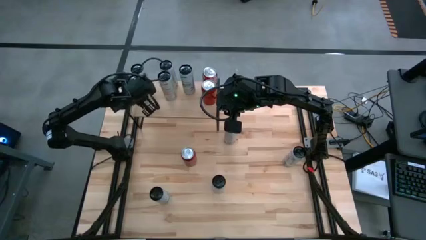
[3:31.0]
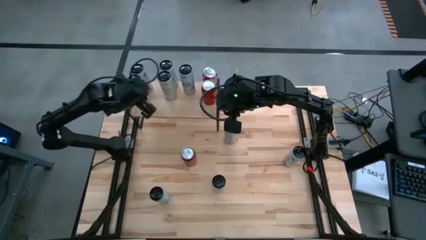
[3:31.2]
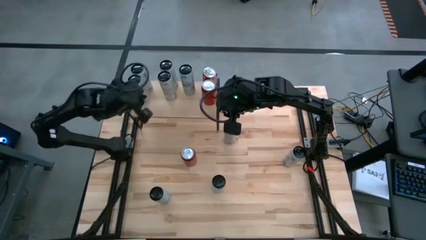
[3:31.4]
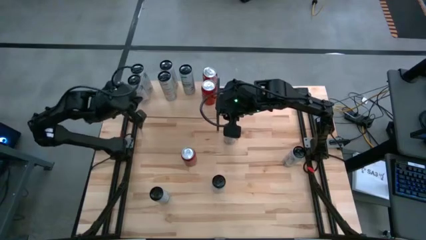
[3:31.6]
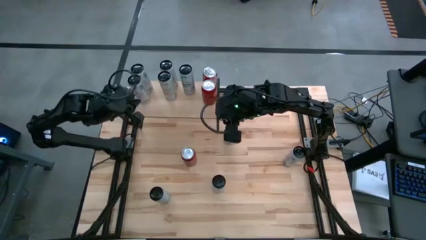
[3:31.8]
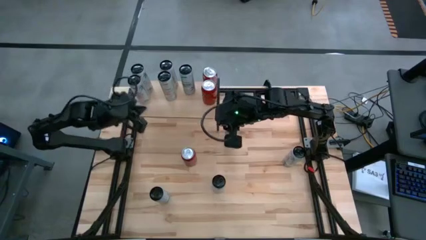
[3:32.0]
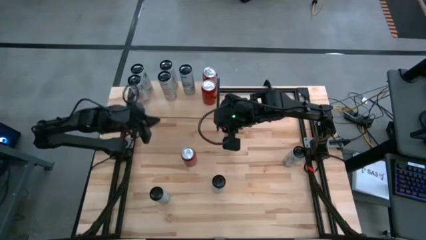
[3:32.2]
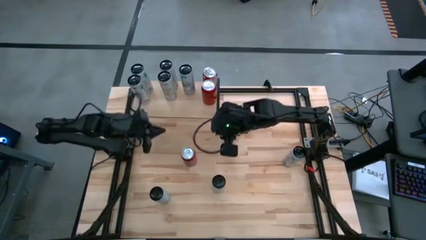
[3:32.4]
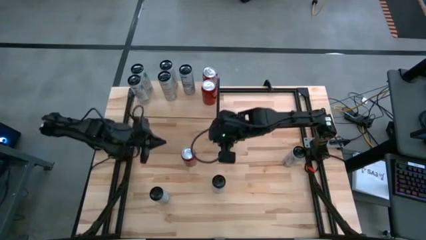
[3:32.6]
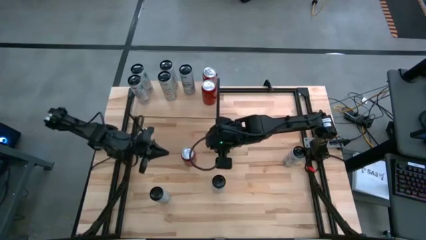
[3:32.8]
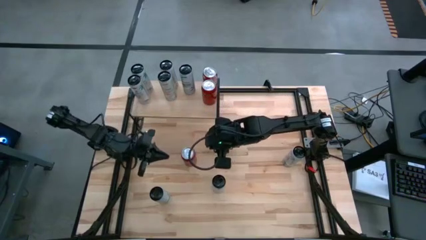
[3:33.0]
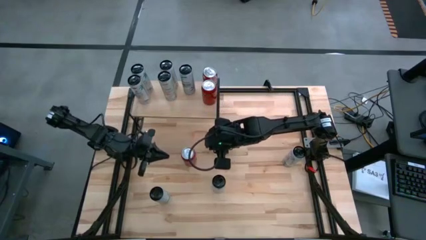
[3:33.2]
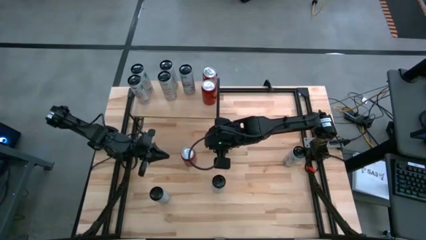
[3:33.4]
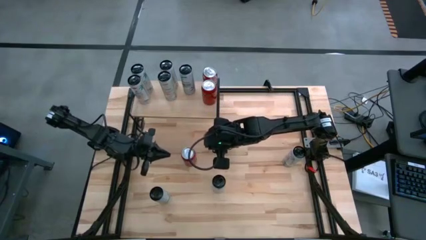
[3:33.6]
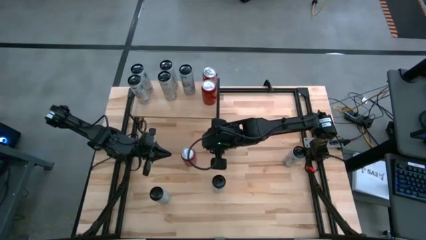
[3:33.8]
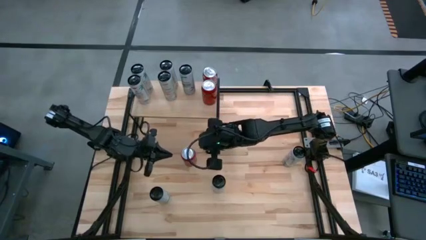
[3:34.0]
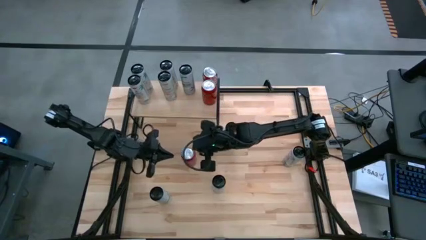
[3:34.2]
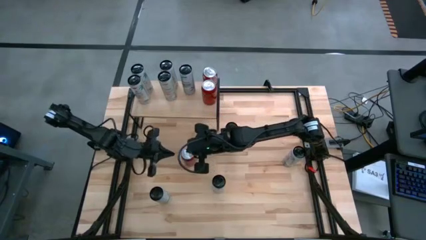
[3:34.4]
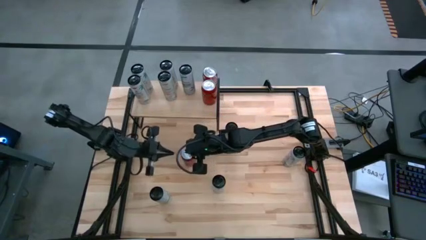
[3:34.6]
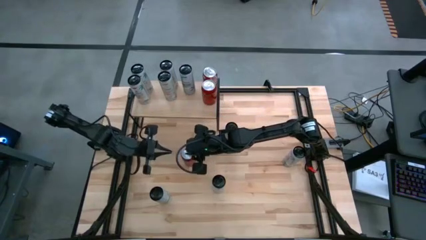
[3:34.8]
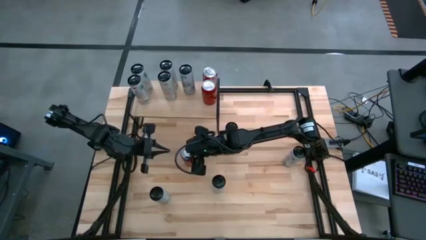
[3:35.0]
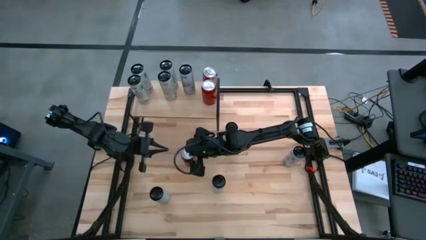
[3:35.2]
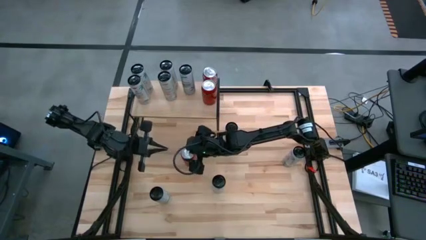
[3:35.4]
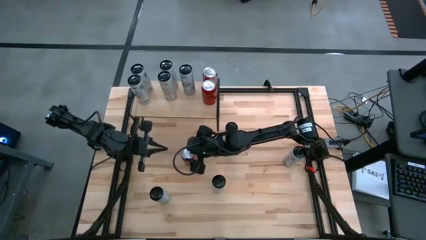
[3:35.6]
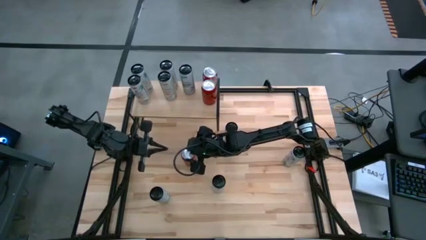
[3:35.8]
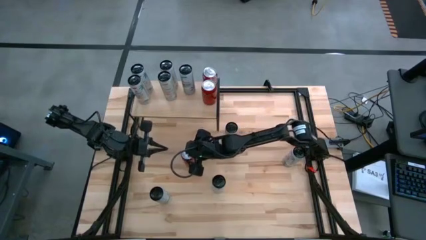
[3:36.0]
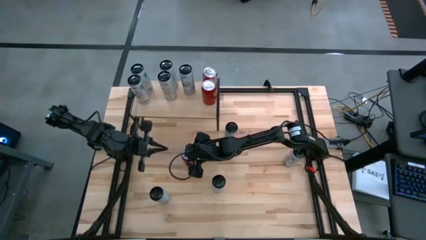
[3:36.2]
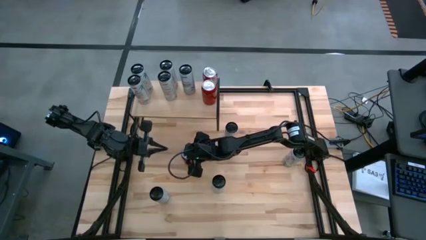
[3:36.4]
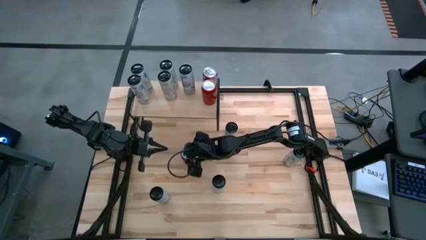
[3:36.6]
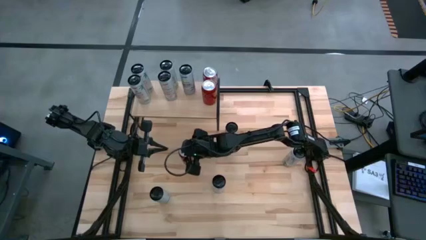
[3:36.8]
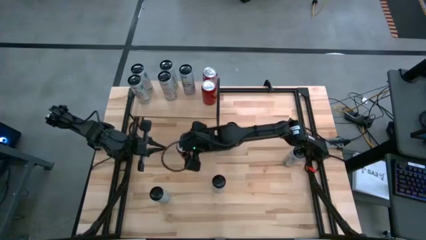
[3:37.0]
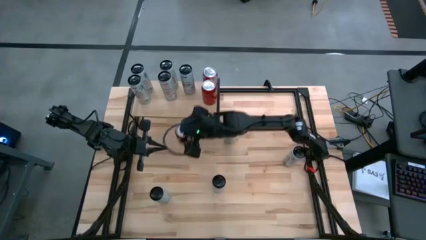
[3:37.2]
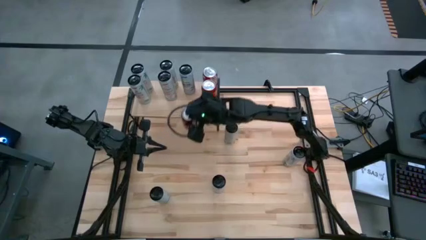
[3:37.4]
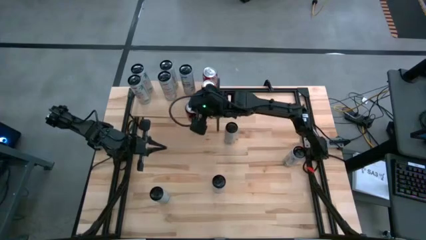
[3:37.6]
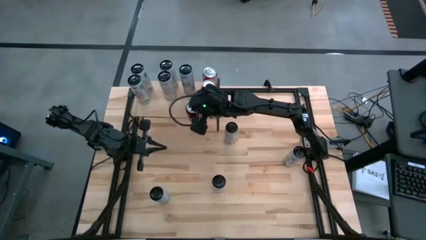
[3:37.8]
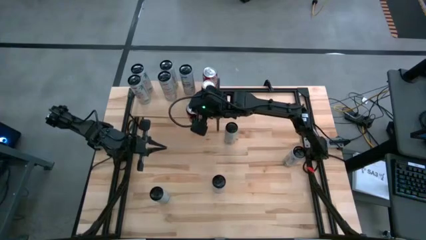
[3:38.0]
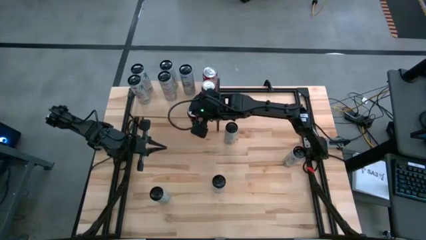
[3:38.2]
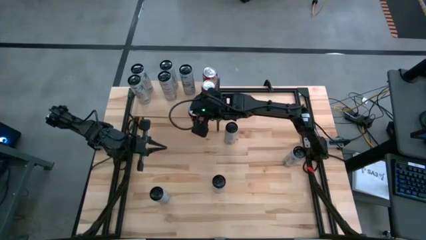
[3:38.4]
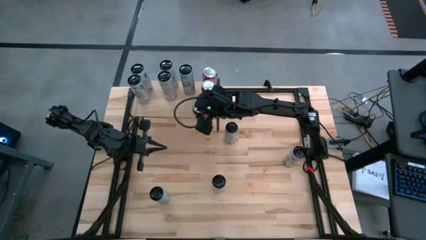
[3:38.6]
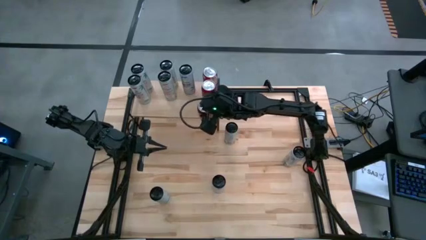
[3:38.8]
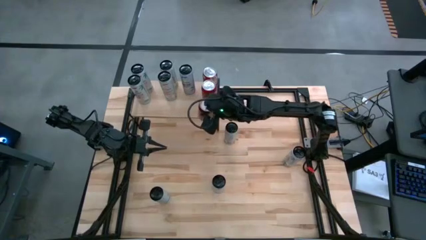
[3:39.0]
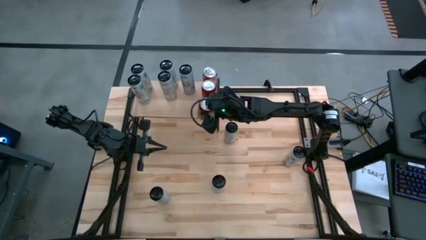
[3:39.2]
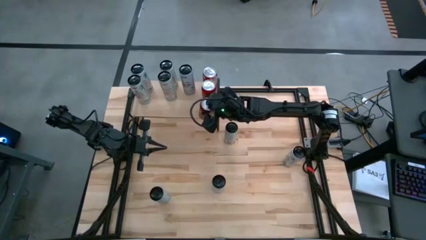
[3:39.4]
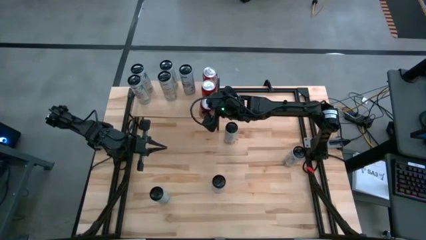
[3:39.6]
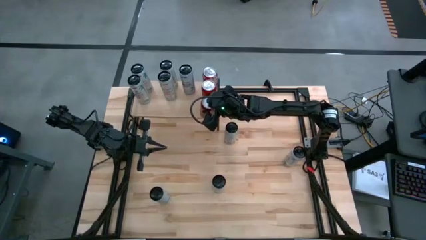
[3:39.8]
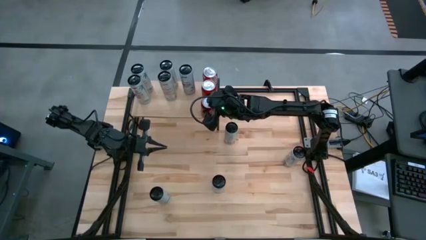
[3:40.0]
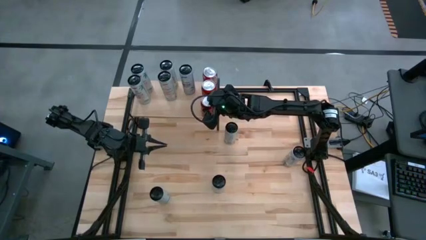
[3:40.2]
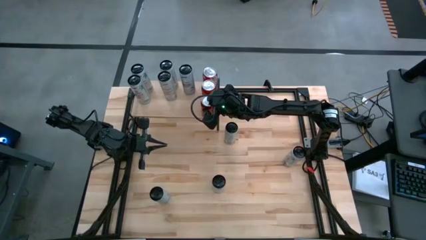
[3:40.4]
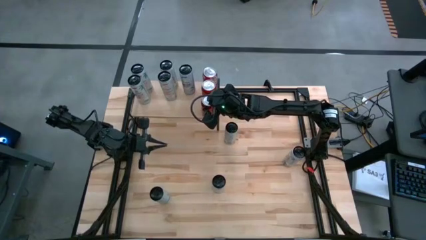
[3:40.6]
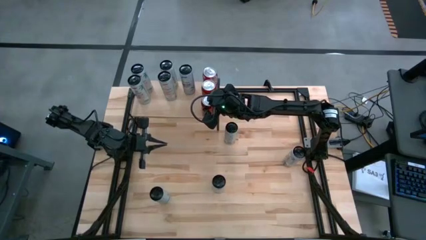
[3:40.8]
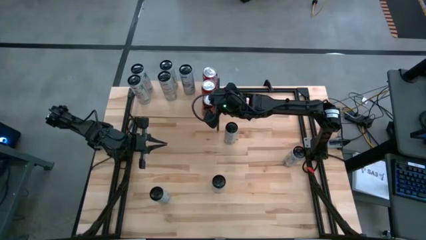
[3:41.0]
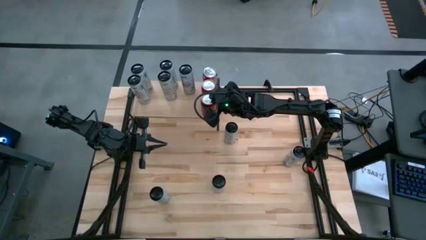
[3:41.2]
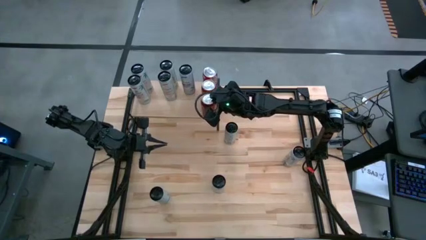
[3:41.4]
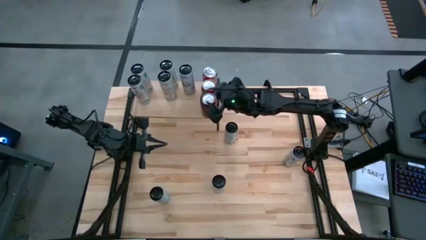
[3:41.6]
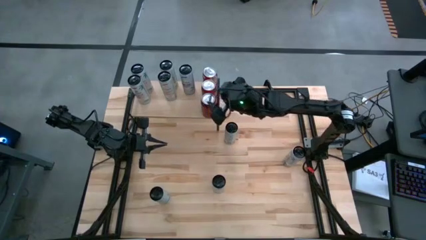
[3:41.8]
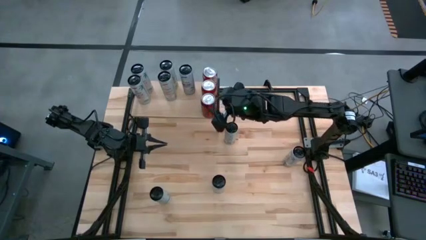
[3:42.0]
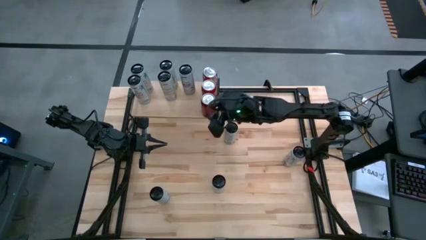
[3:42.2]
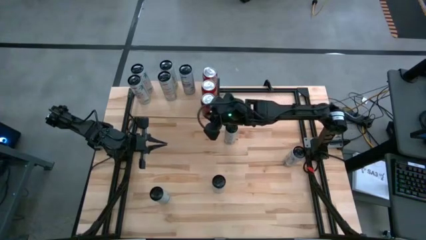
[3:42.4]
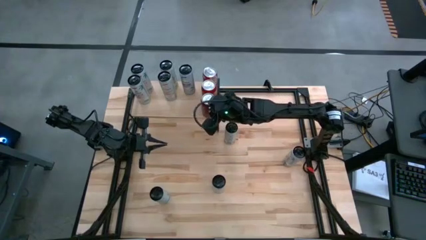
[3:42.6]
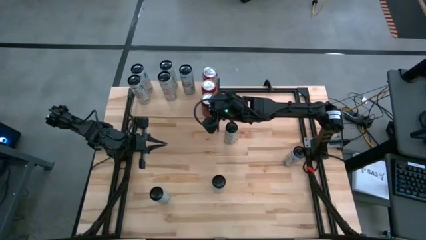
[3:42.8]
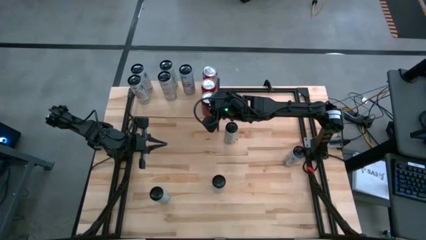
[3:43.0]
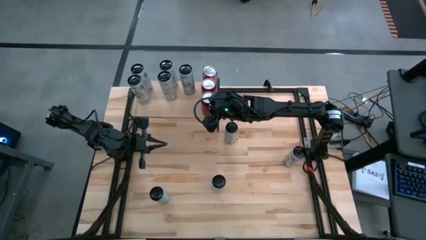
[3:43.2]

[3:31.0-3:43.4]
Task: Place canned beverage on shelf
Put the red soda can on the shelf aligned with the other red soda cans

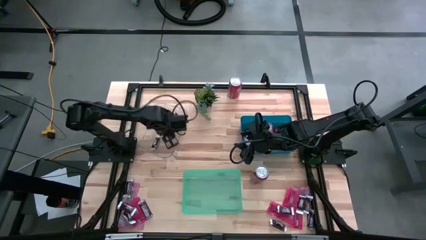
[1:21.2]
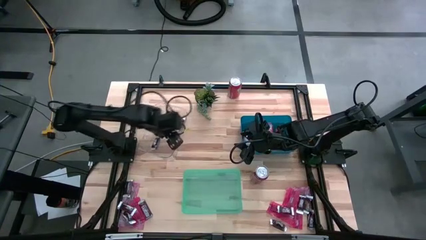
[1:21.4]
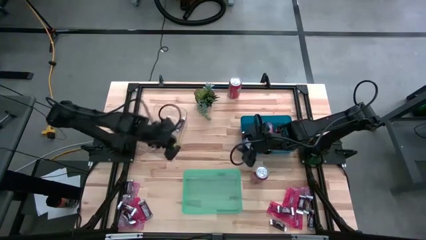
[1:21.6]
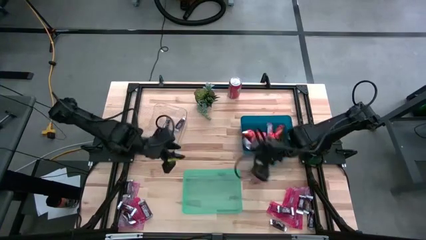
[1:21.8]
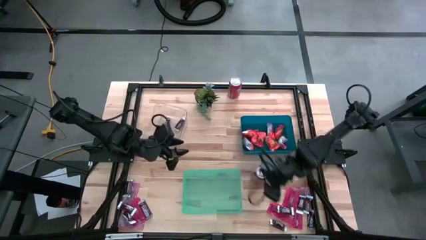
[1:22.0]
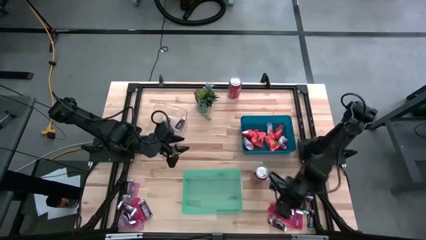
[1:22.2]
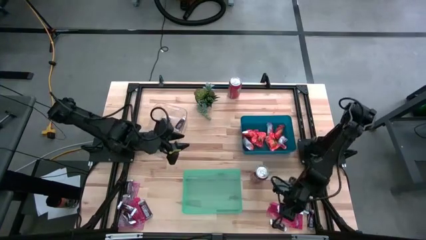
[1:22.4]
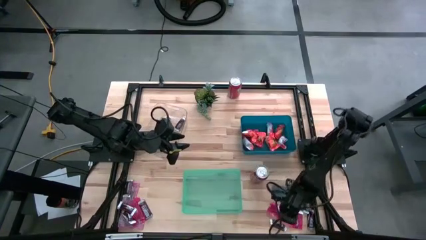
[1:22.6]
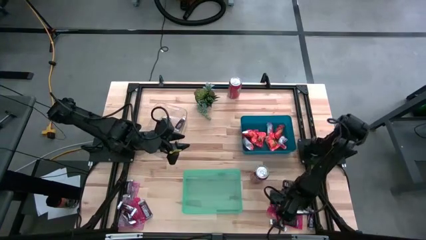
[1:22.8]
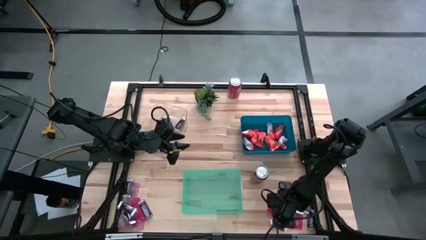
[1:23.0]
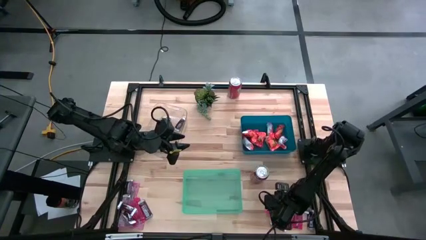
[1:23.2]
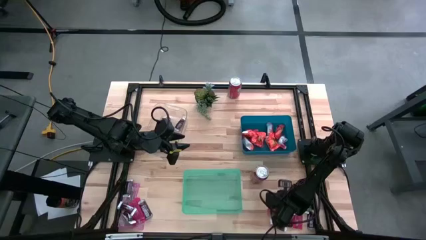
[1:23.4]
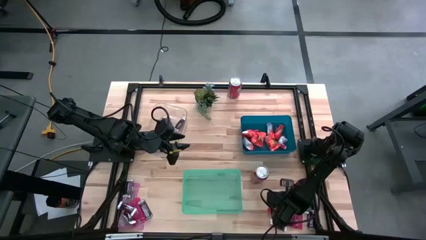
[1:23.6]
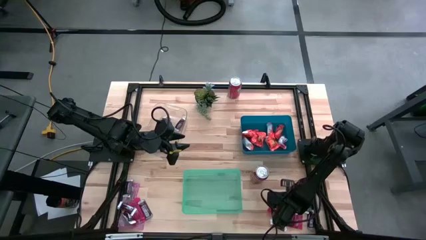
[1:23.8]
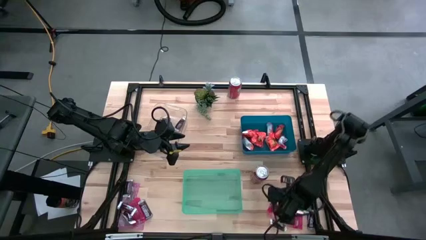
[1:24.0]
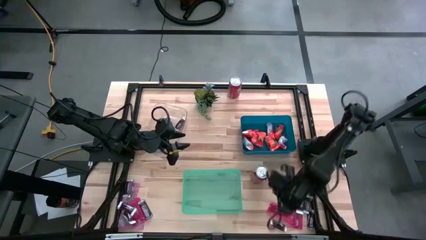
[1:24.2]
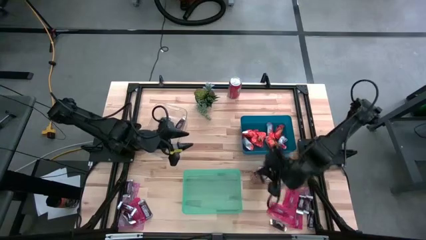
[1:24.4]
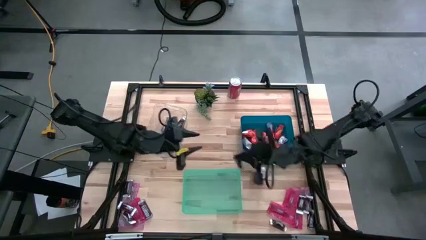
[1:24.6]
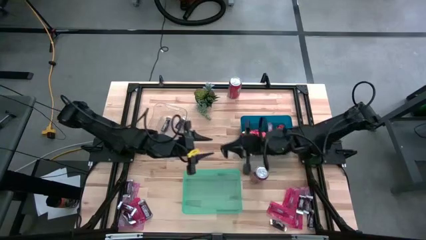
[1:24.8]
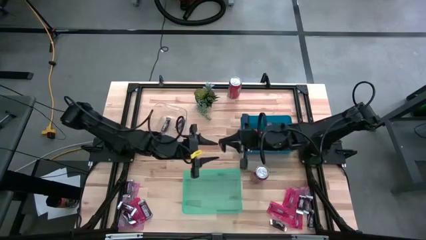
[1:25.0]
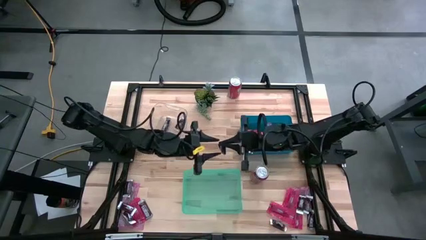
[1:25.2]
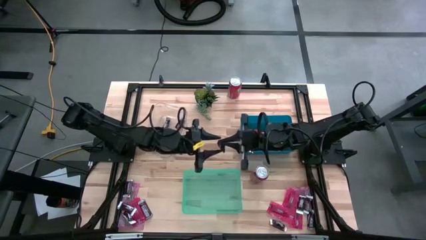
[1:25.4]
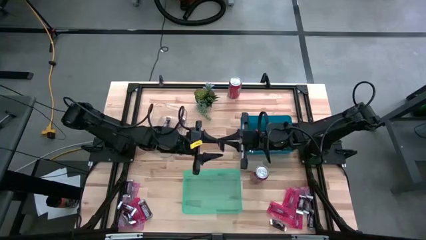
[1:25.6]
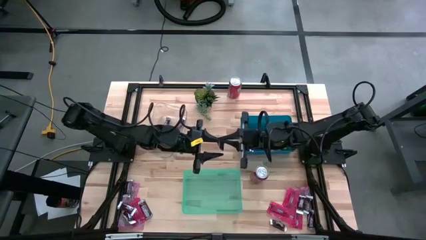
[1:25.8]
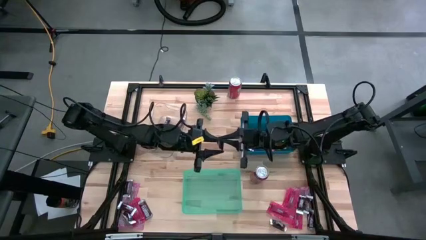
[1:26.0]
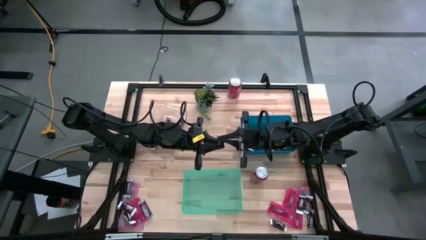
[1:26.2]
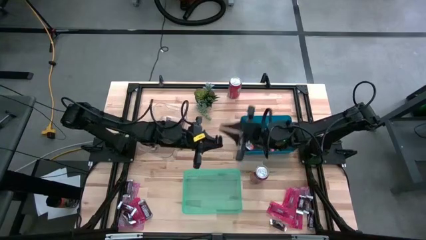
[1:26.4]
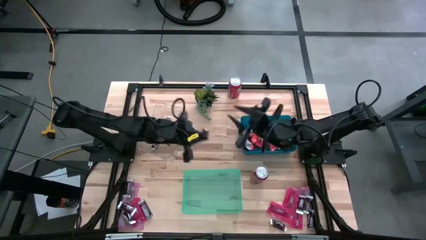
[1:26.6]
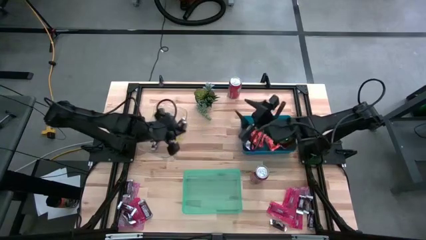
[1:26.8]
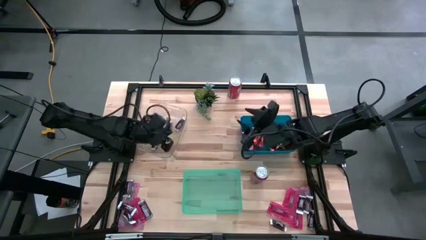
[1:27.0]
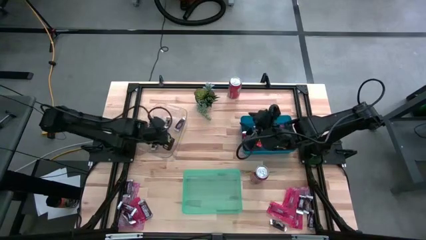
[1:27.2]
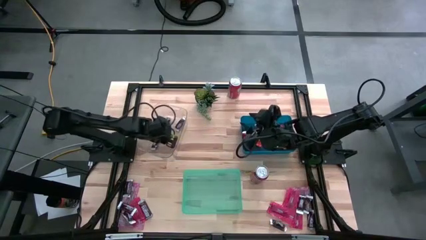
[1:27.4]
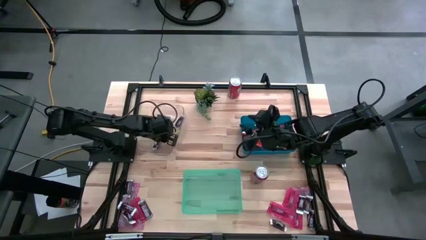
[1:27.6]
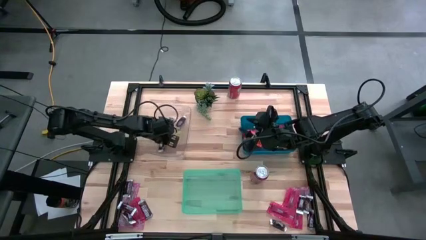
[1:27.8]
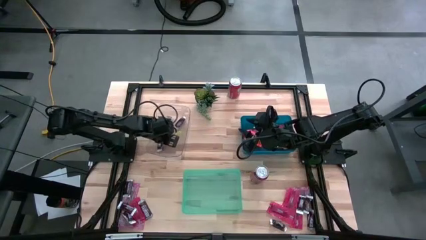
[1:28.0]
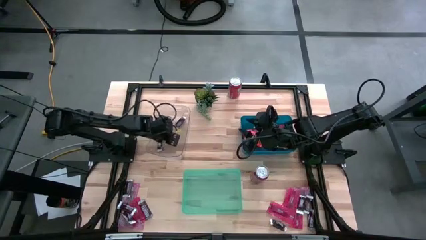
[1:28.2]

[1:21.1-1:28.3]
Task: Sort candy
Put the brown chocolate bar into the transparent bin
